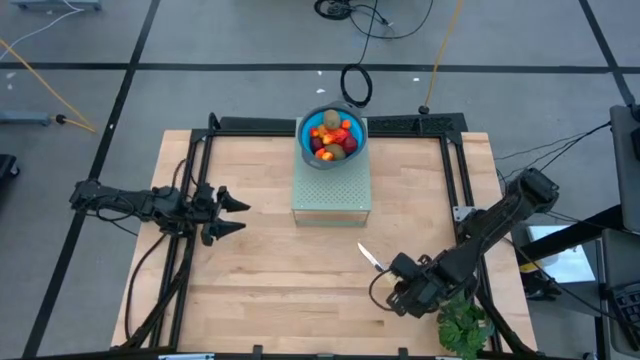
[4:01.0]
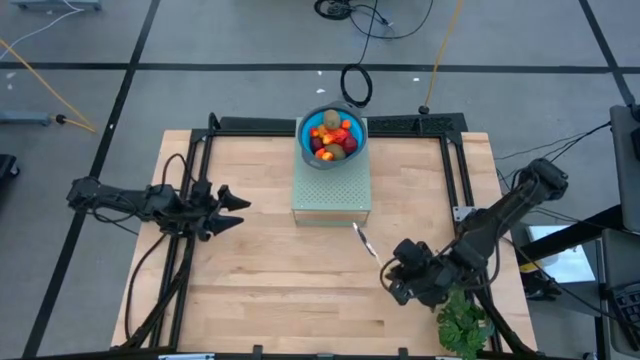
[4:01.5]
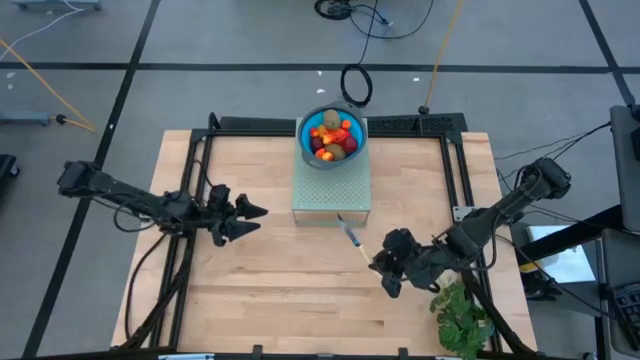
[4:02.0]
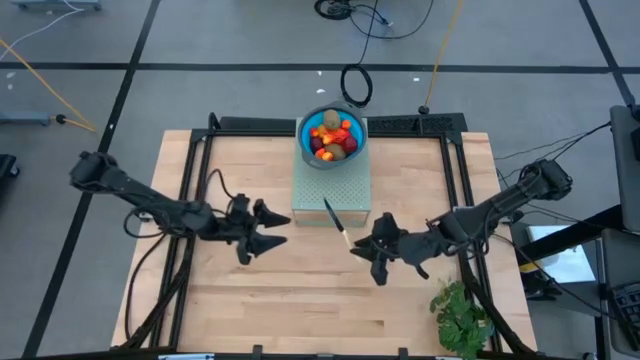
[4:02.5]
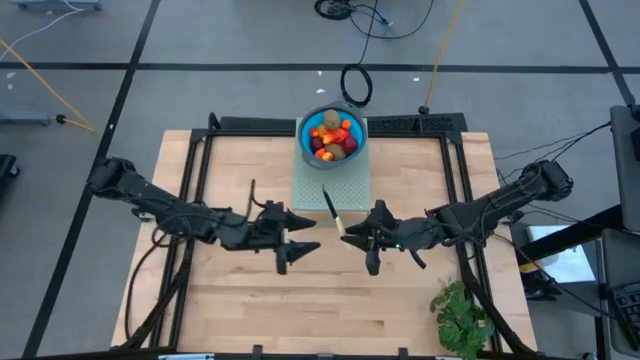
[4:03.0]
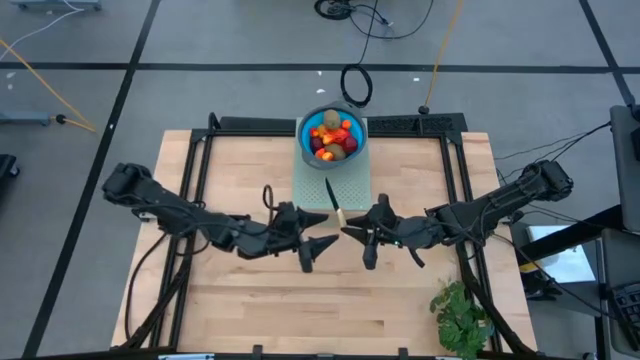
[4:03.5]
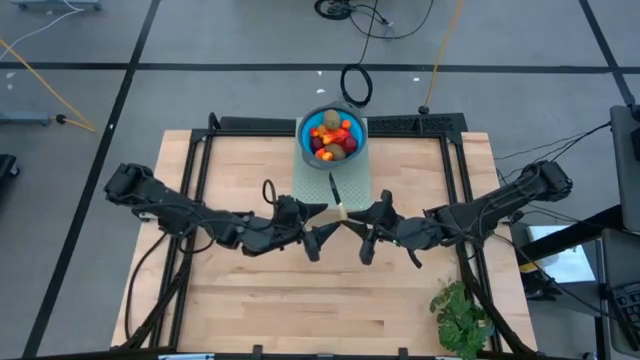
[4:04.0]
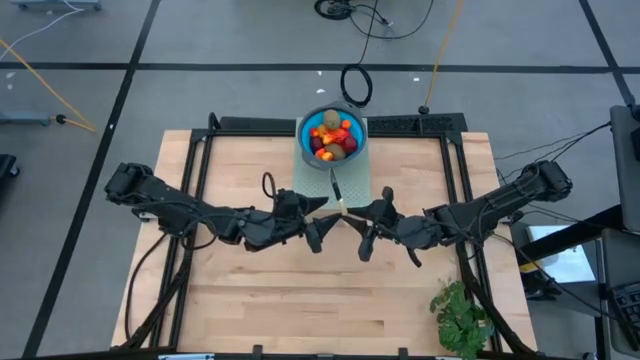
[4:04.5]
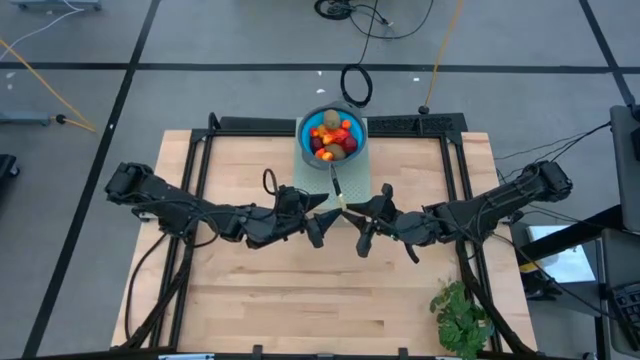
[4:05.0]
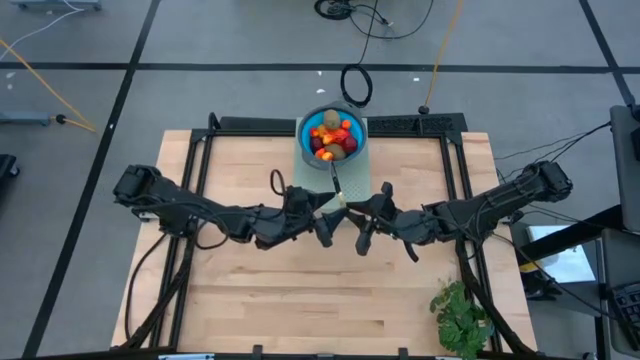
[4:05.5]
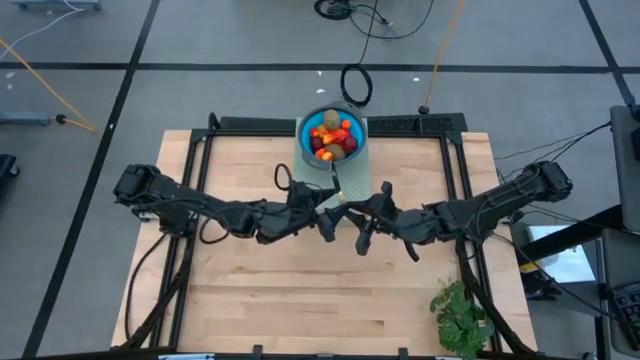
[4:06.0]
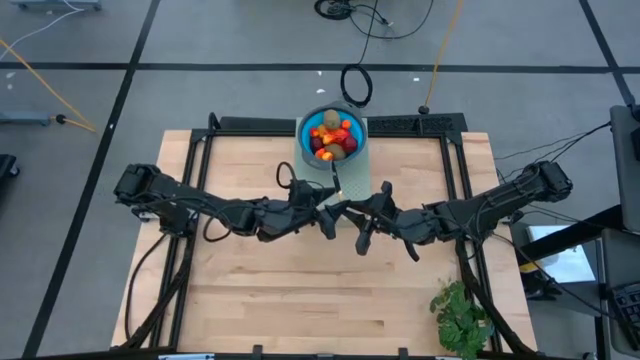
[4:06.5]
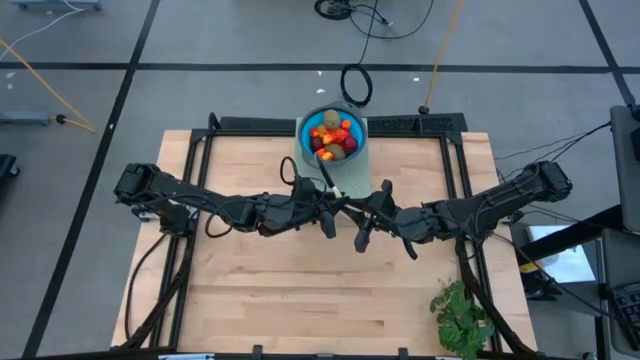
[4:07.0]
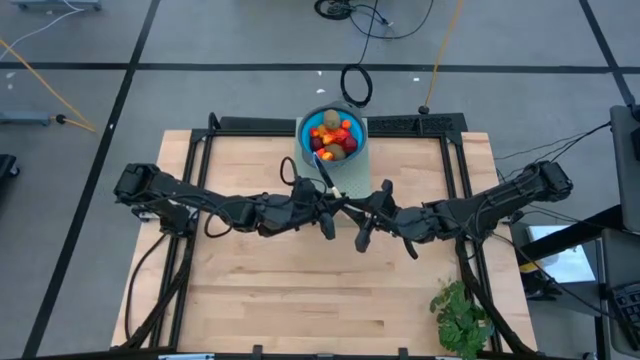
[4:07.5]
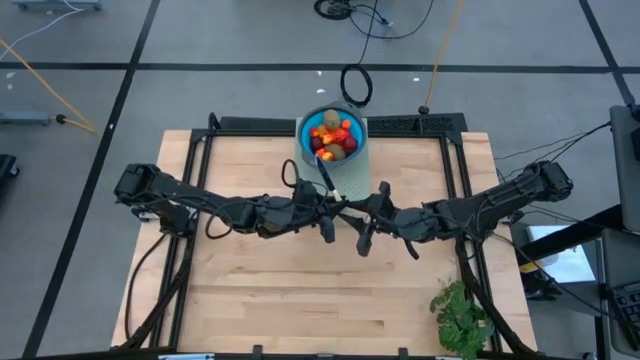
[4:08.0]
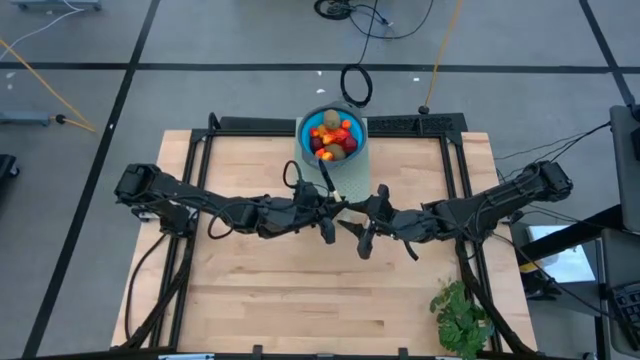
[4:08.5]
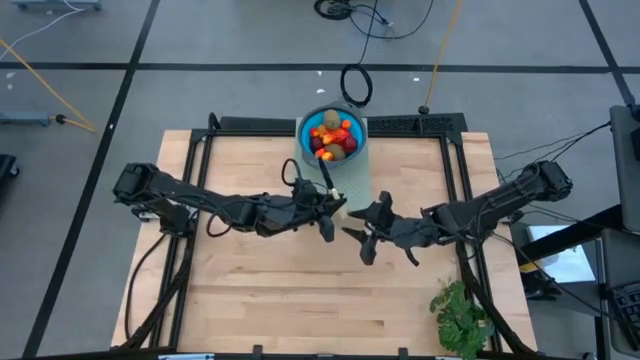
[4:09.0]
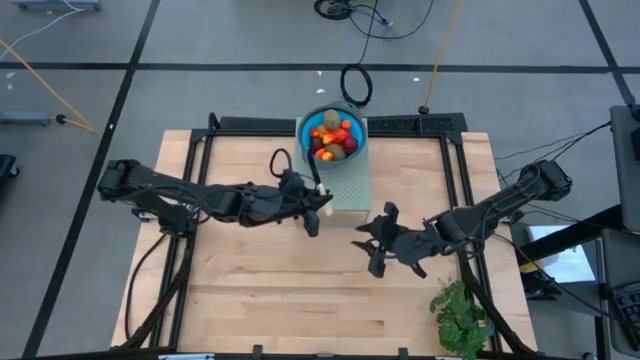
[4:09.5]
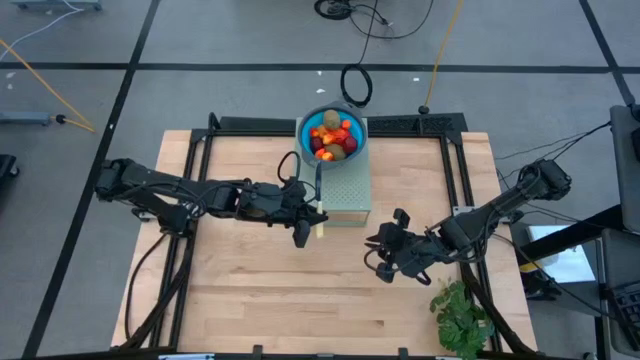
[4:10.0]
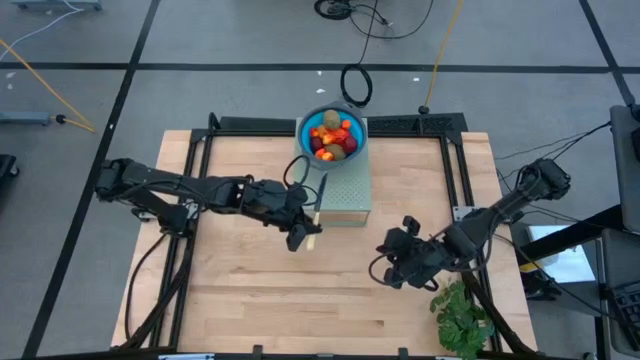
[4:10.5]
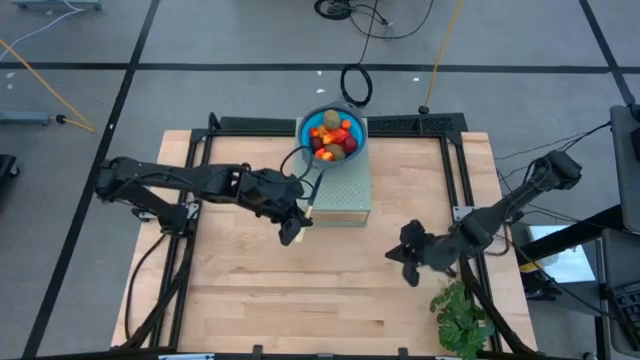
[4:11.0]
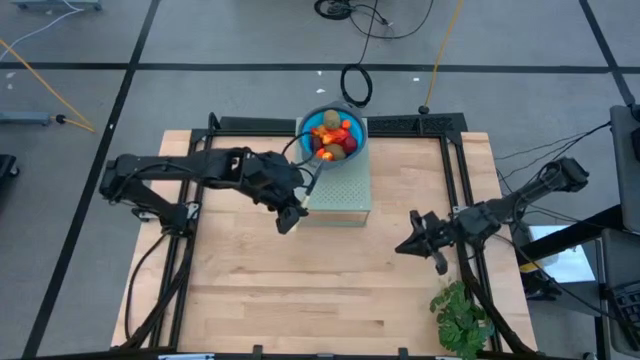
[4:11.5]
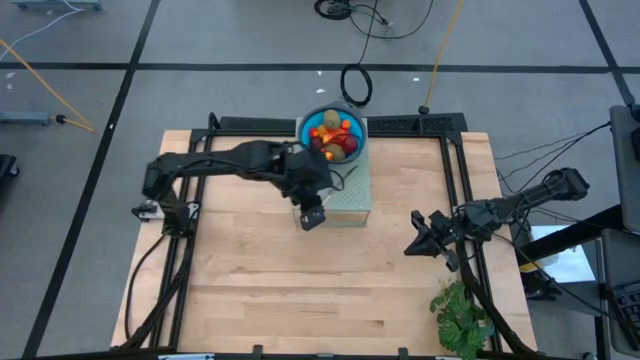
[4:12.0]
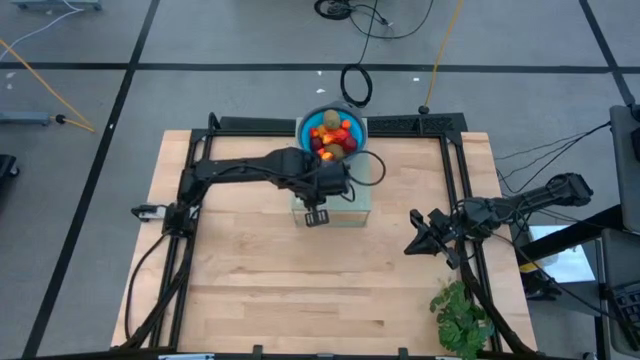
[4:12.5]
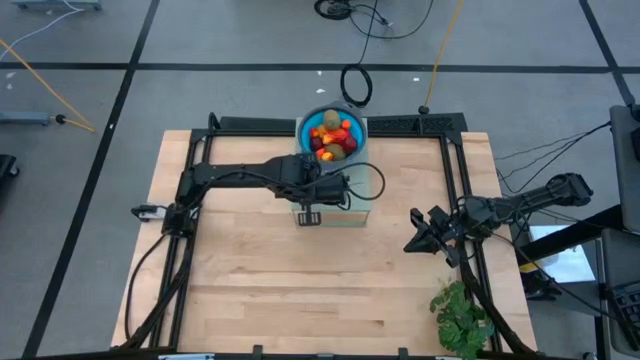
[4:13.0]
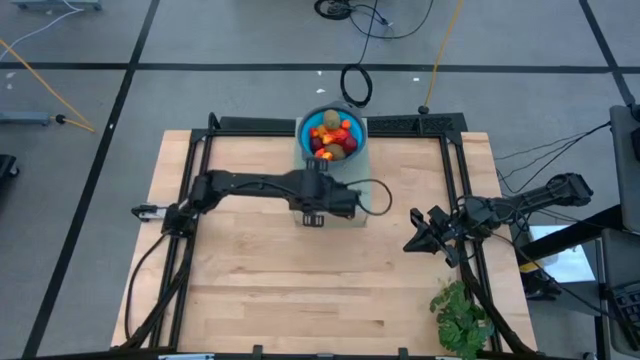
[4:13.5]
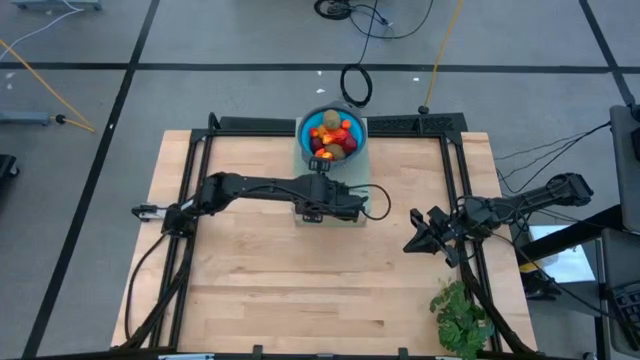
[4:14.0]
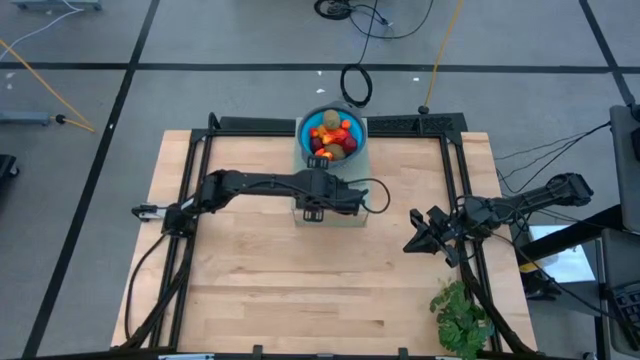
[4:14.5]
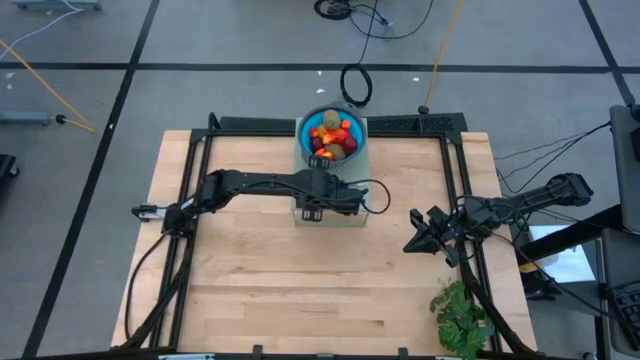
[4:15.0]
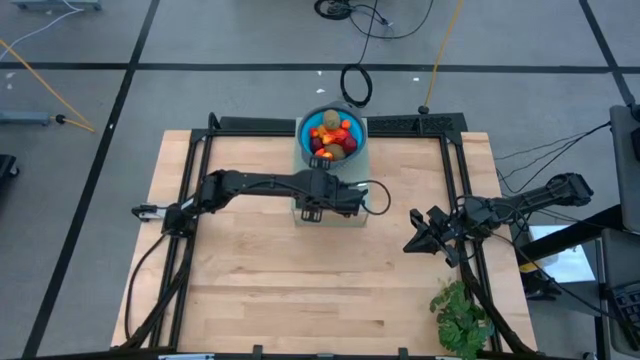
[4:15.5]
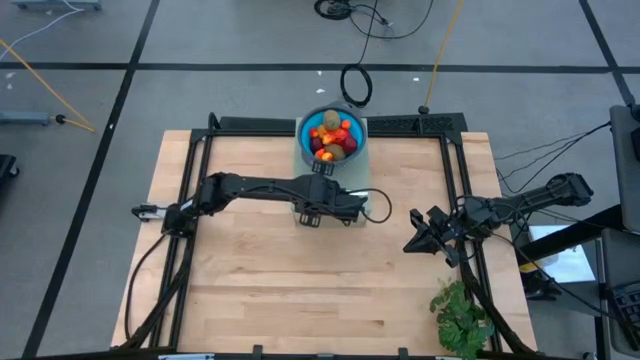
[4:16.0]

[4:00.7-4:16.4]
Task: Pick & Place Fruit
Put the knife on the shelf

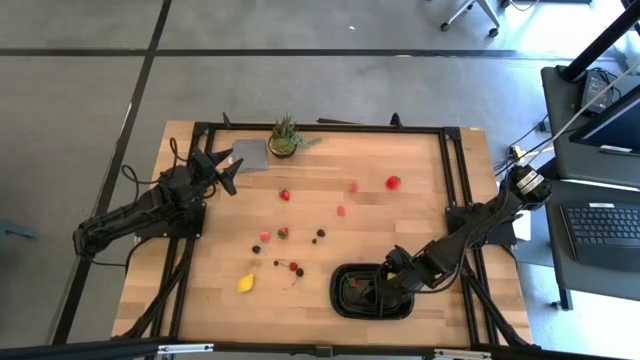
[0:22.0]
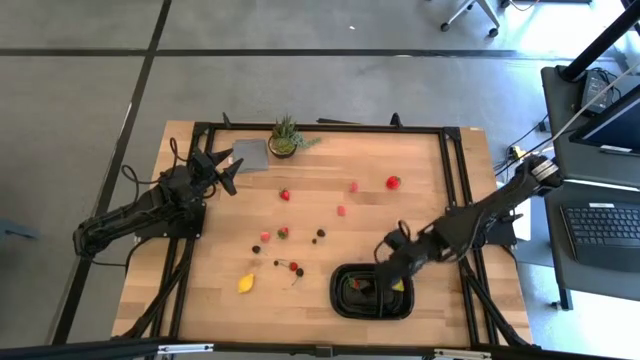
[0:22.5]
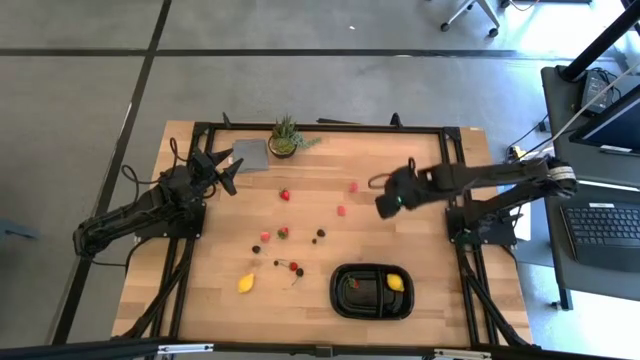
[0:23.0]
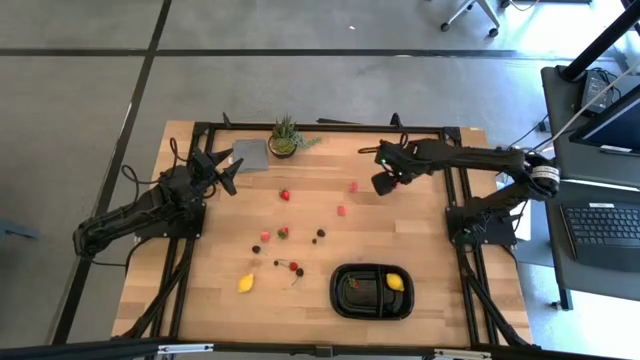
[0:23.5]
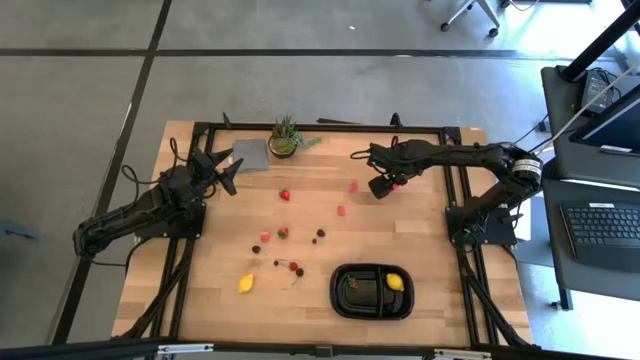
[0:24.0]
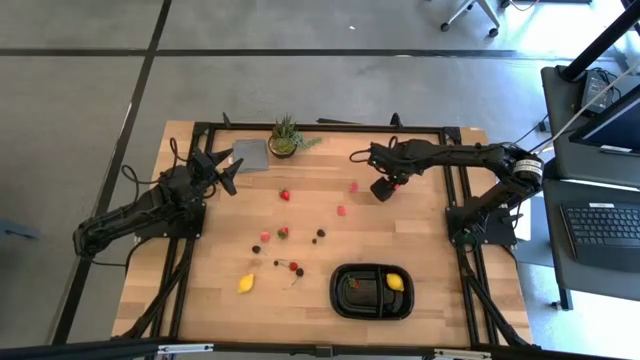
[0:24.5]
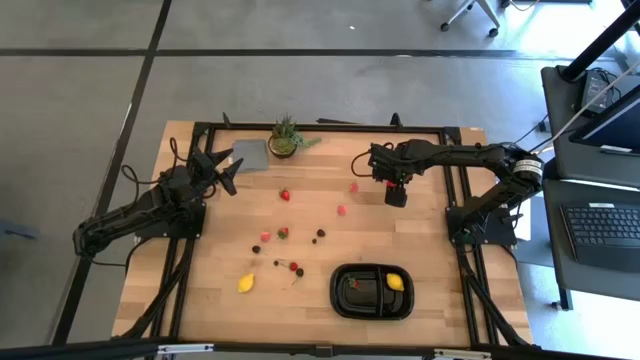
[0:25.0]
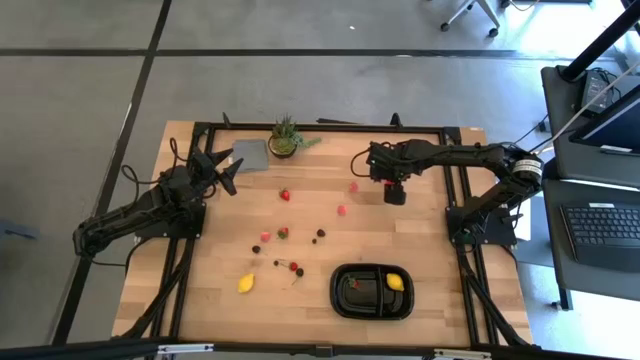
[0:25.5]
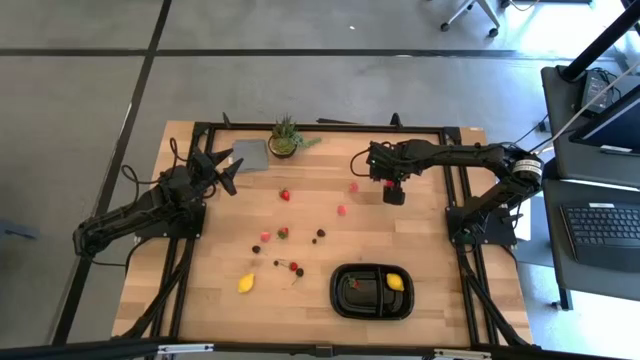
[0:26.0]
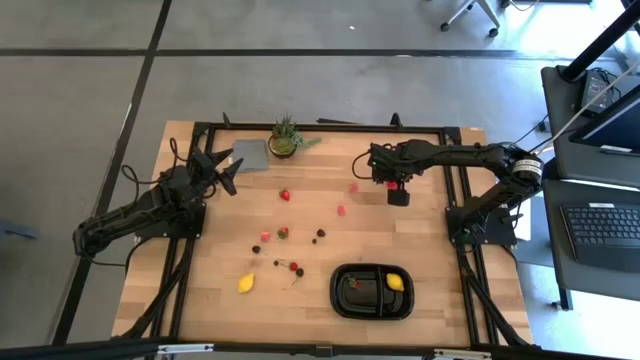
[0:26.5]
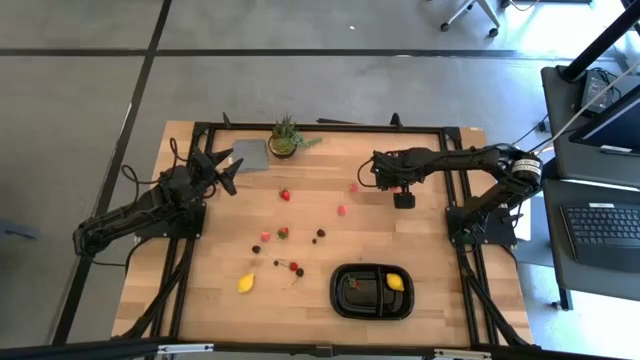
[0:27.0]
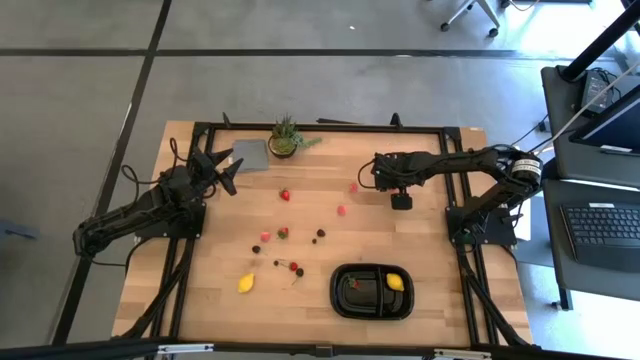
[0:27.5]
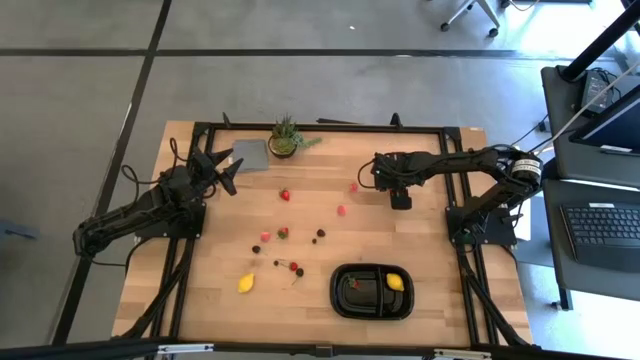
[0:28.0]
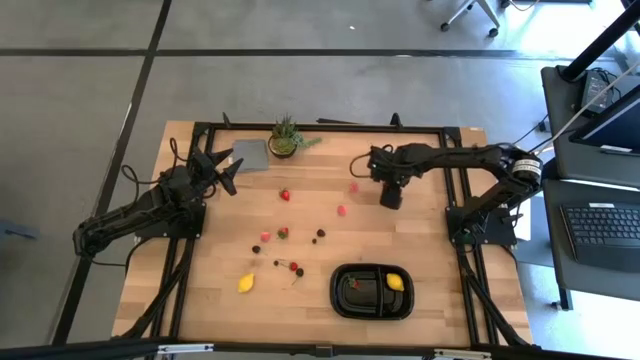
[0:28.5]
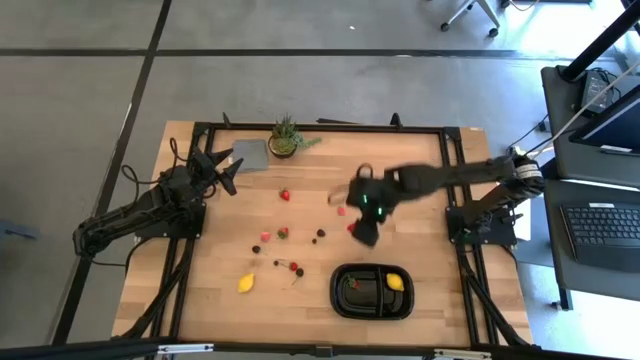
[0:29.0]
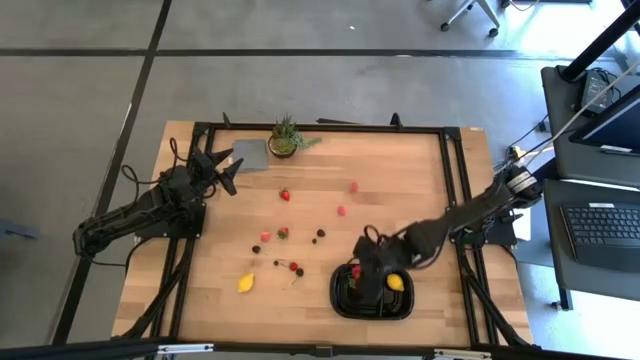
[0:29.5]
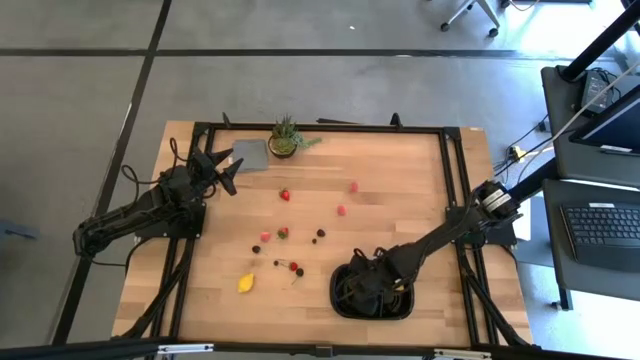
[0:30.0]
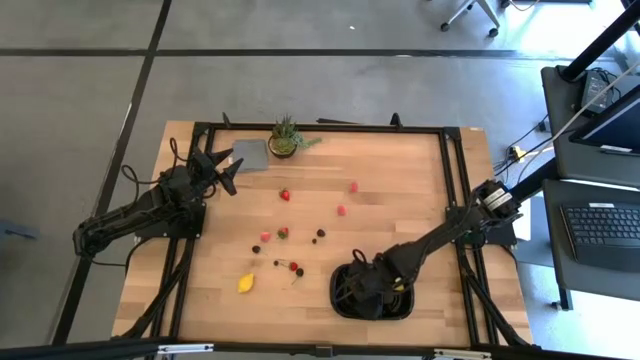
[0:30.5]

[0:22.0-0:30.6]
Task: Pick and placing Produce into tupperware
Put the red strawberry into the black bin
